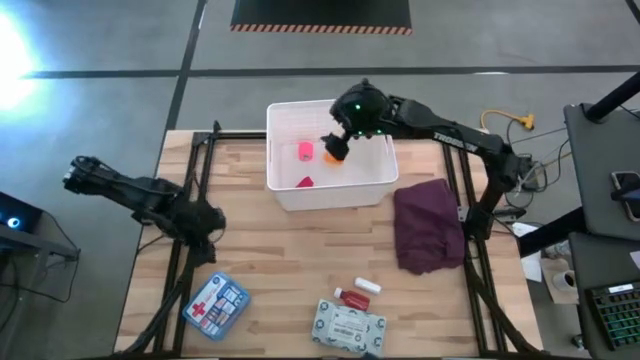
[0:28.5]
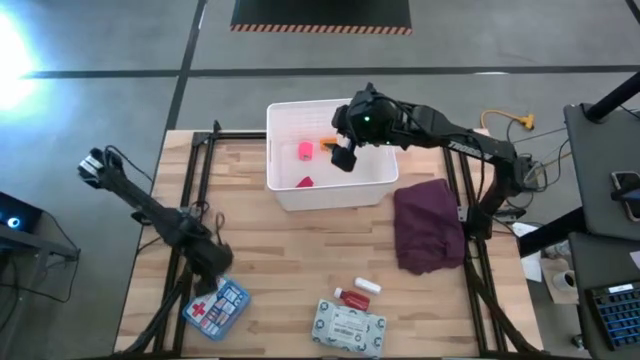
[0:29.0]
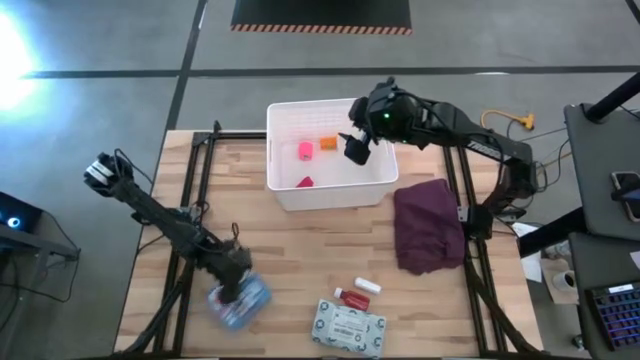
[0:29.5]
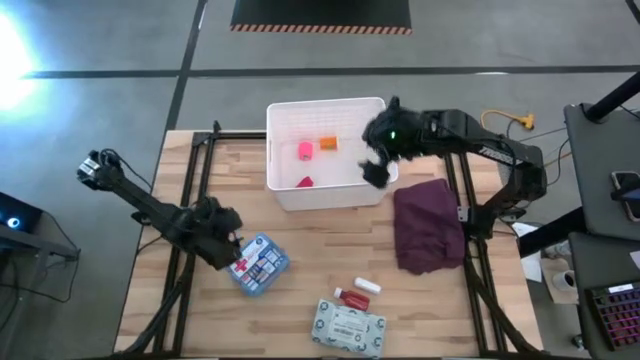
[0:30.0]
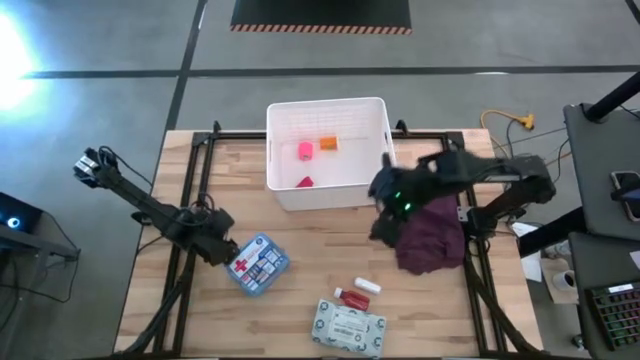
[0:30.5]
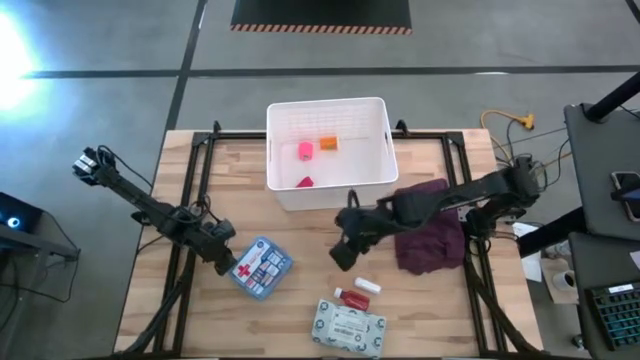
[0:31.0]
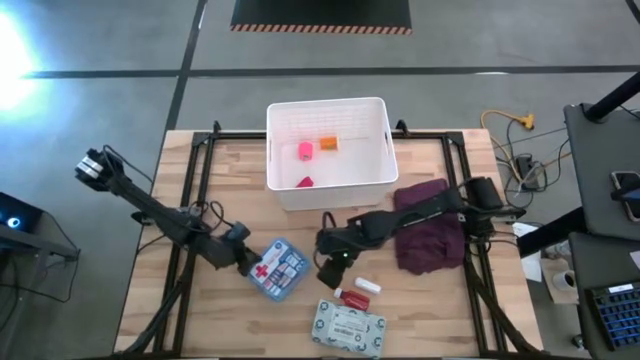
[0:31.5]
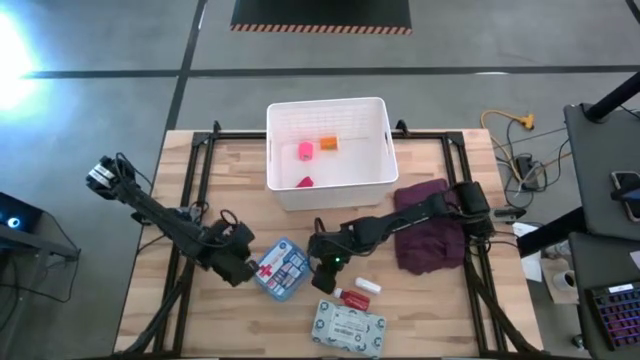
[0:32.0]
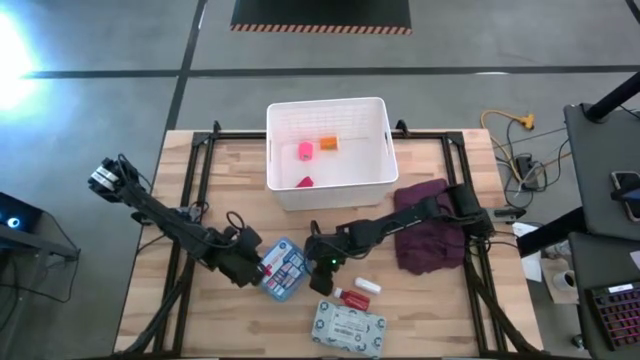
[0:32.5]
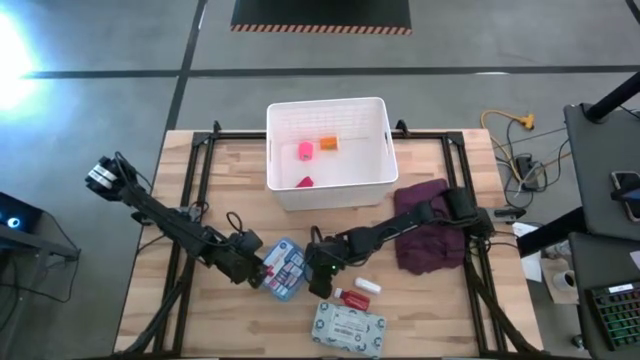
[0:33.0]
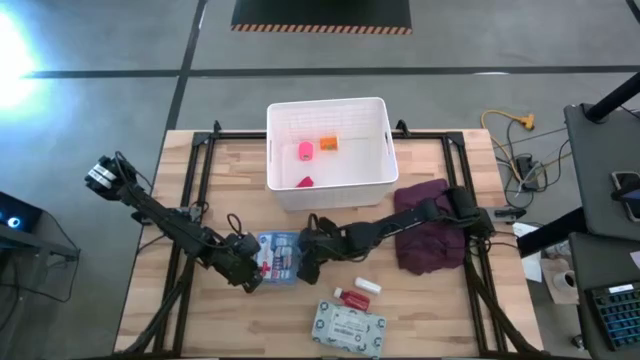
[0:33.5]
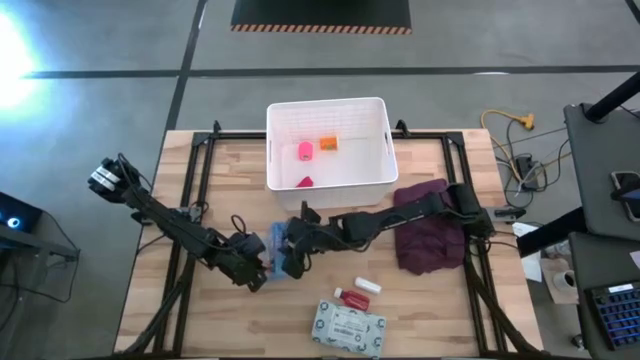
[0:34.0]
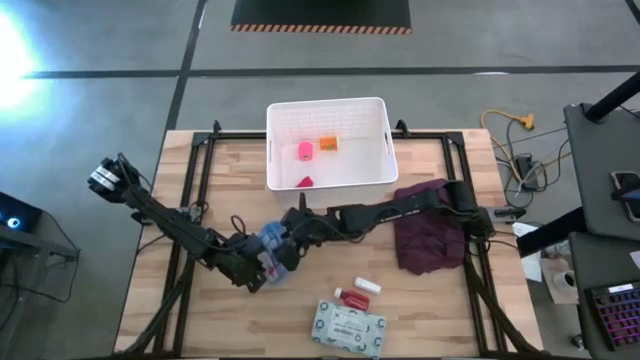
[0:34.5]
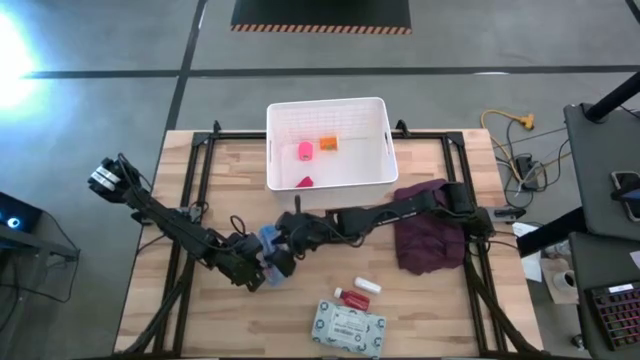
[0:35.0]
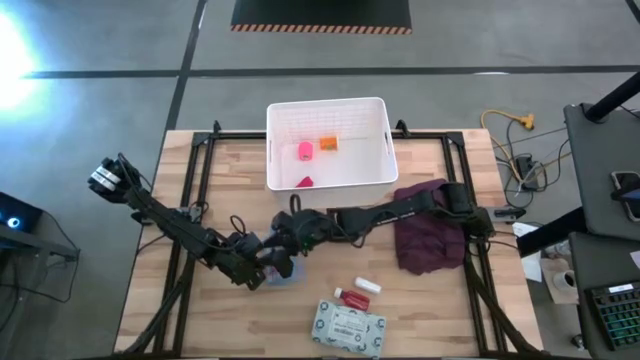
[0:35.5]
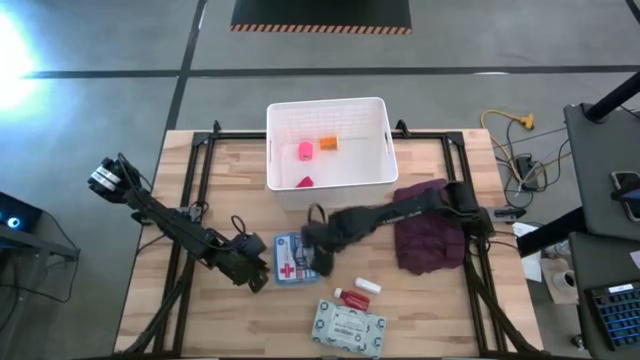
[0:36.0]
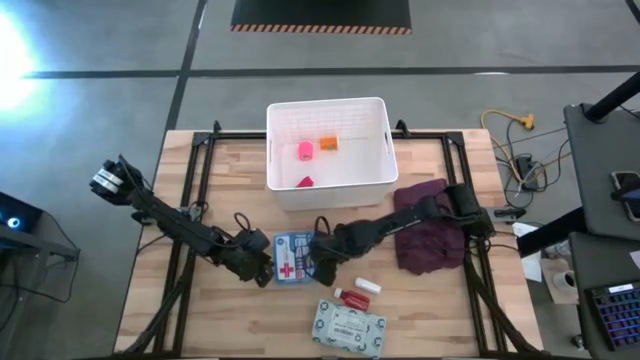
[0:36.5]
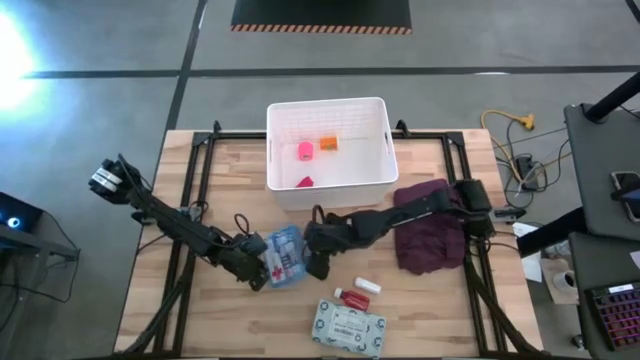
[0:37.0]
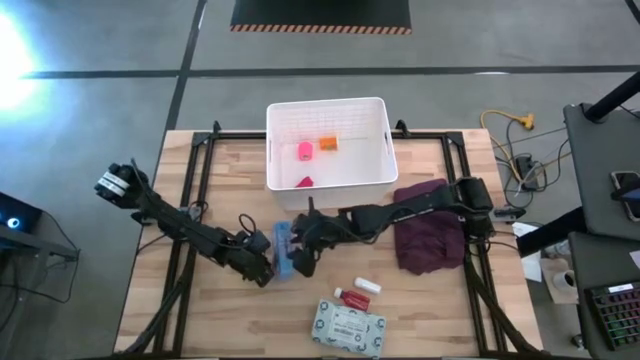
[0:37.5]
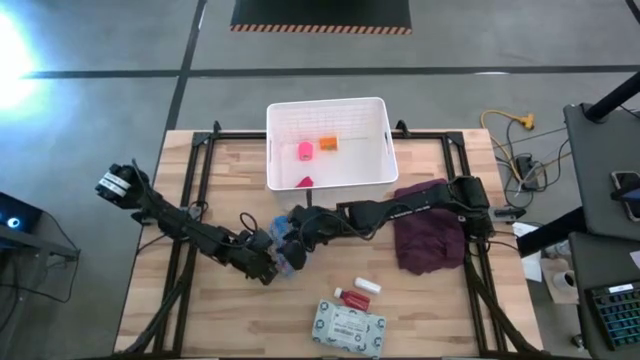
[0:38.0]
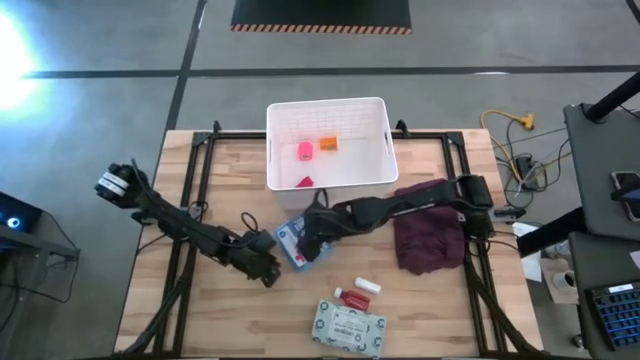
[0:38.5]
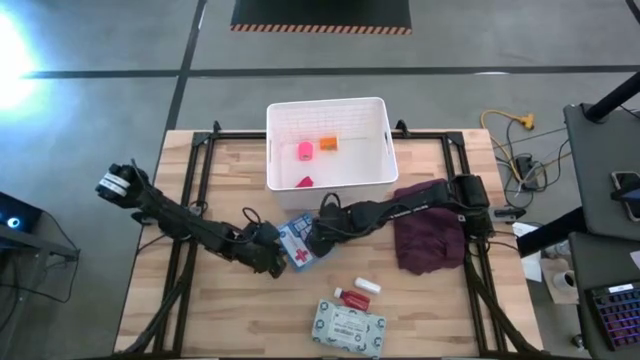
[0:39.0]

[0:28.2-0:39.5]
Task: Pick & place medical supplies in basket/bin
Put the blue first aid kit into the white bin

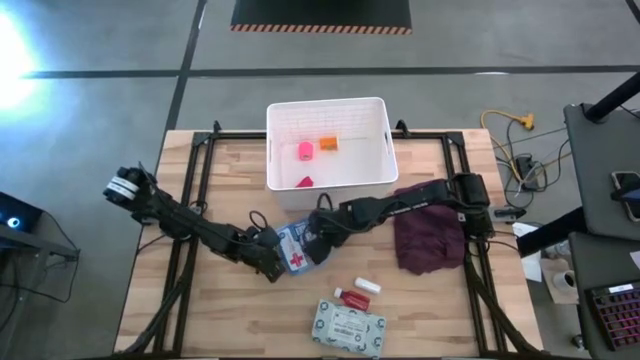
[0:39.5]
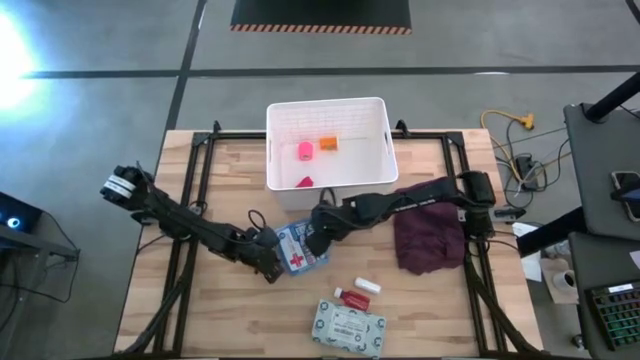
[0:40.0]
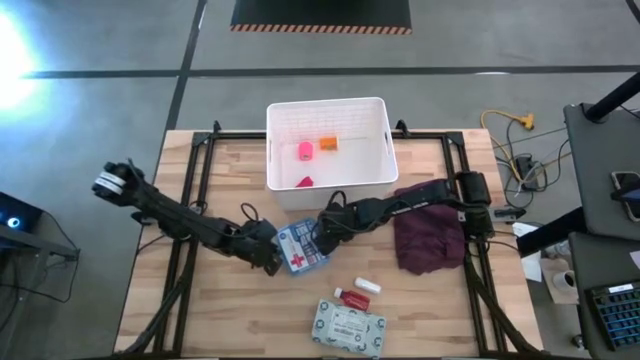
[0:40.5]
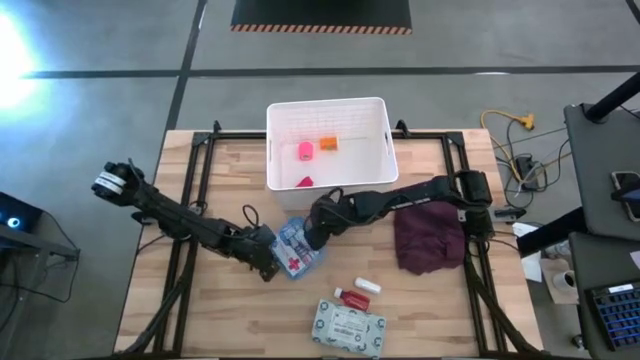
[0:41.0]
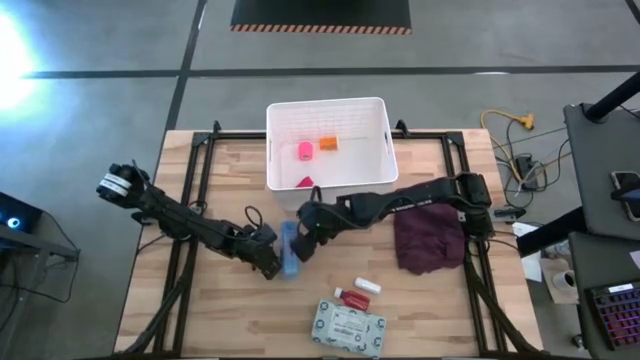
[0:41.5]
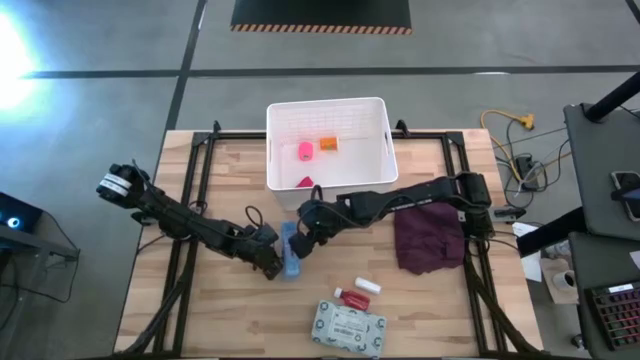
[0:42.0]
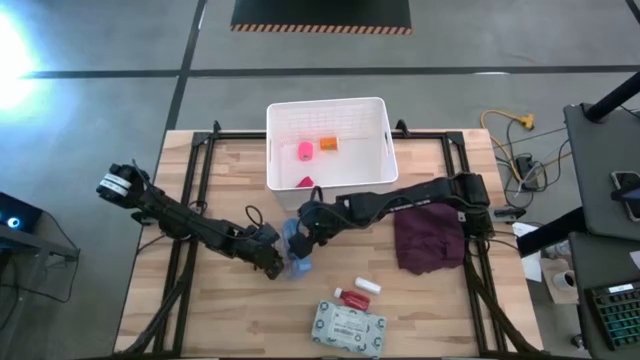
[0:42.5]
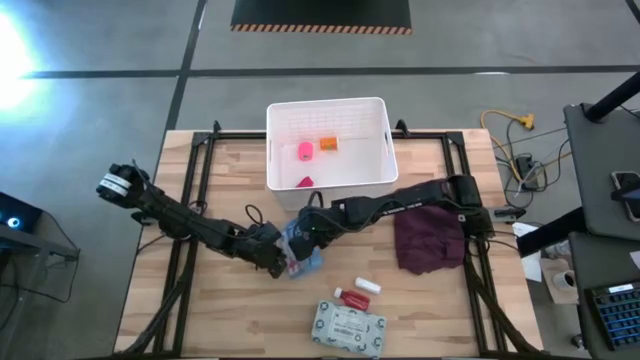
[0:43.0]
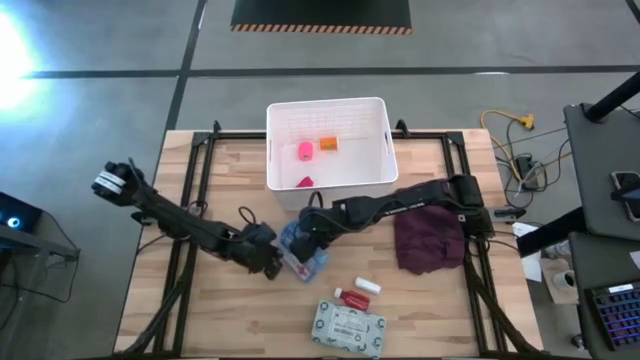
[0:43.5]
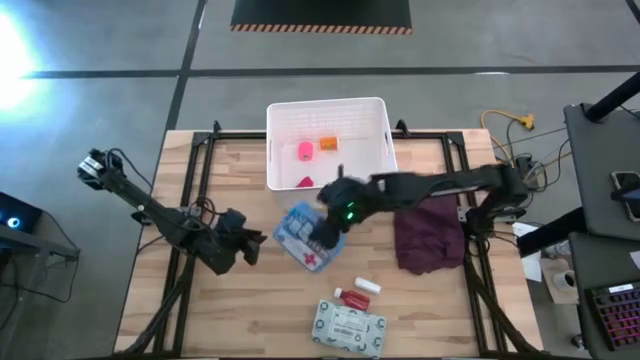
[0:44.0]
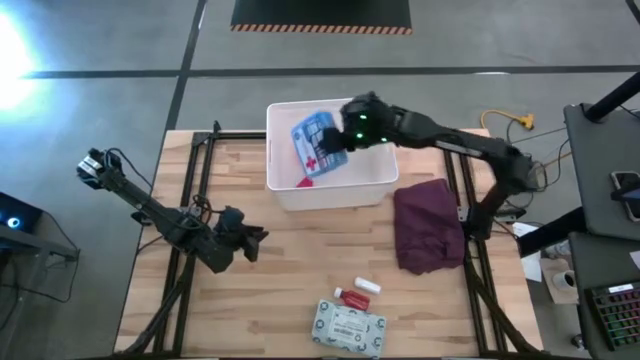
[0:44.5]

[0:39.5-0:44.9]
Put the blue first aid kit into the white bin

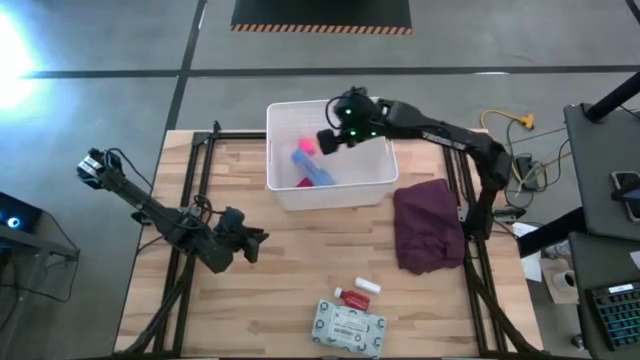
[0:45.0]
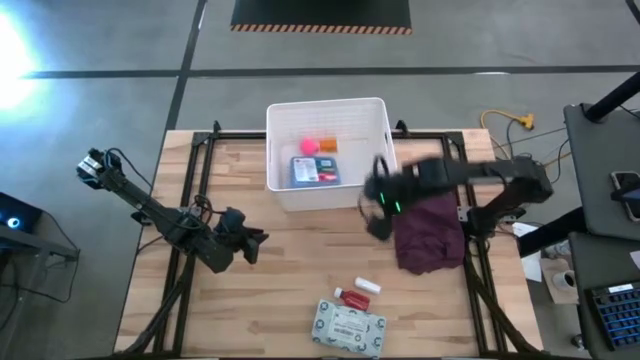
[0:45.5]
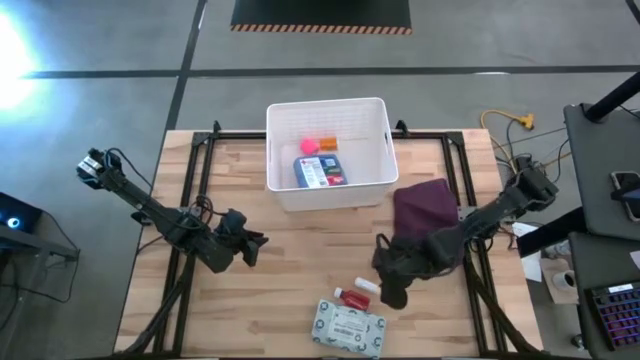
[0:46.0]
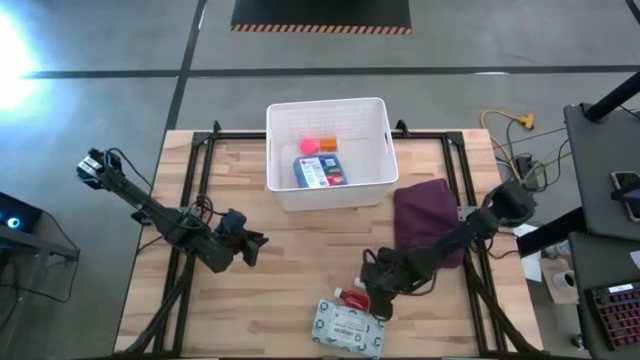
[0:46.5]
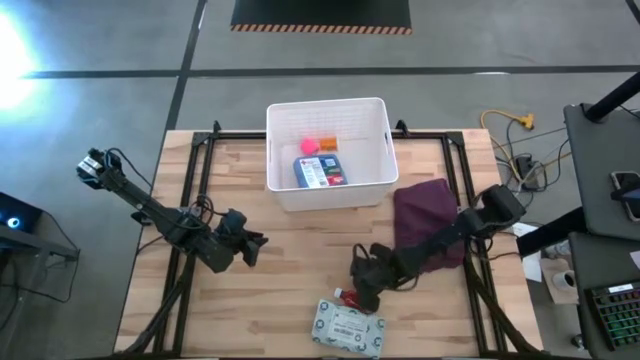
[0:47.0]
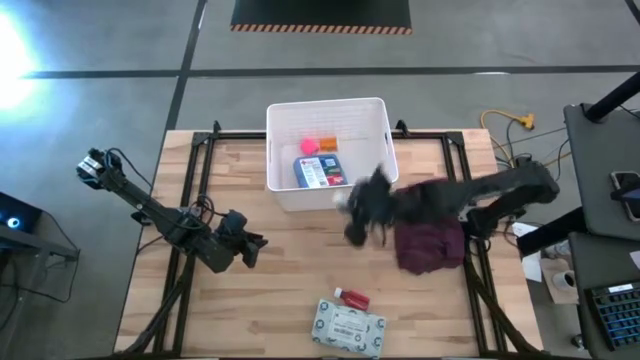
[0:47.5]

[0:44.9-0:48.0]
Put the white gauze into the white bin

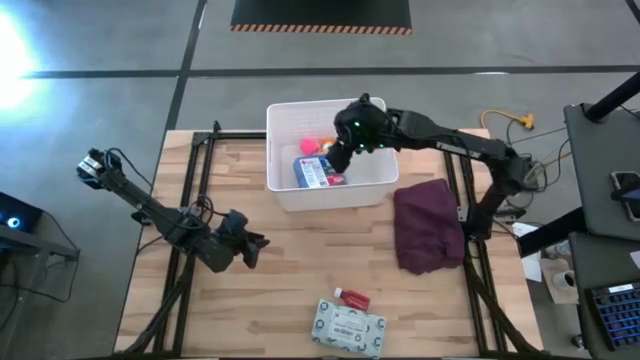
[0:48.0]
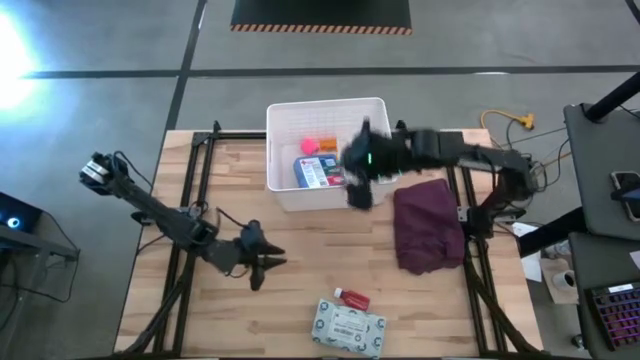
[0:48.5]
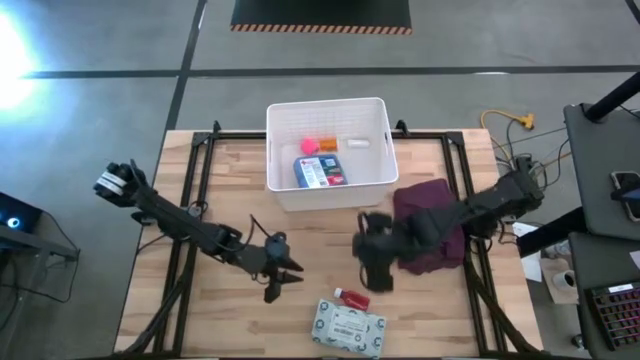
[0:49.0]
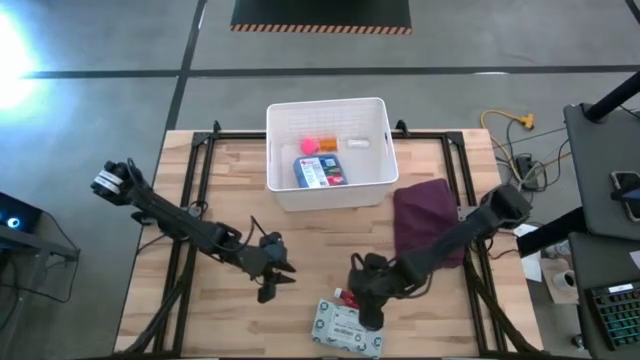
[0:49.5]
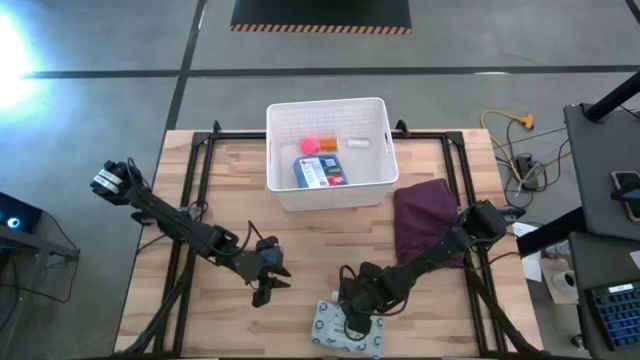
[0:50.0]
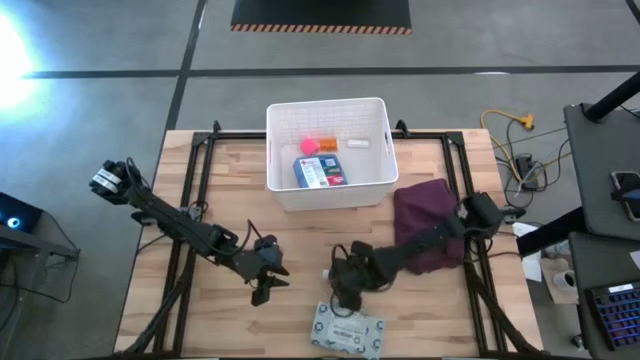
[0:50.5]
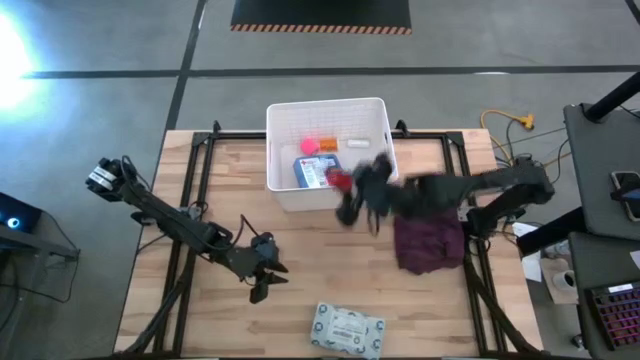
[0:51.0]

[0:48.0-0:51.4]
Put the red pill bottle into the white bin
